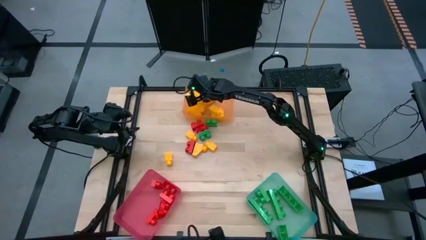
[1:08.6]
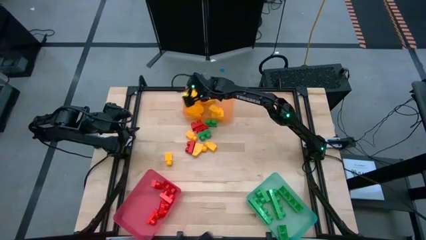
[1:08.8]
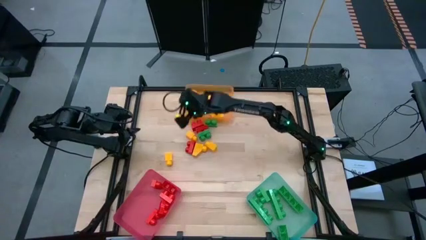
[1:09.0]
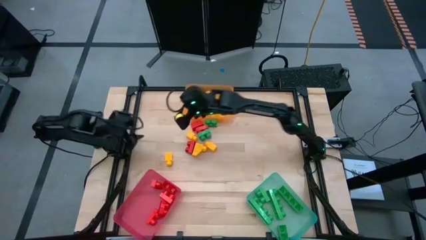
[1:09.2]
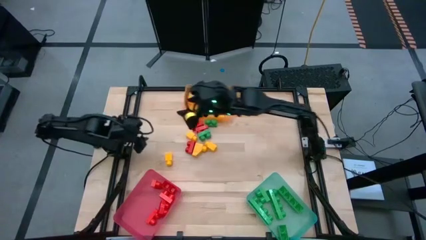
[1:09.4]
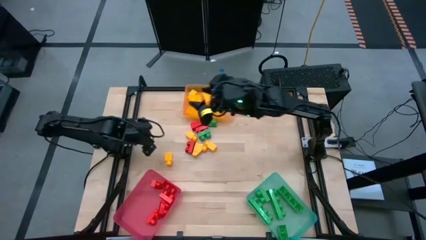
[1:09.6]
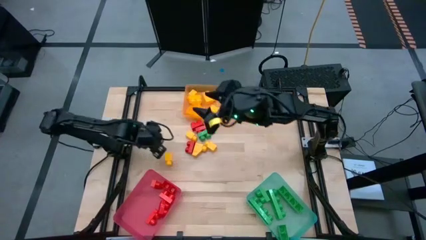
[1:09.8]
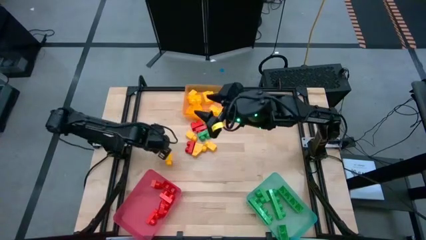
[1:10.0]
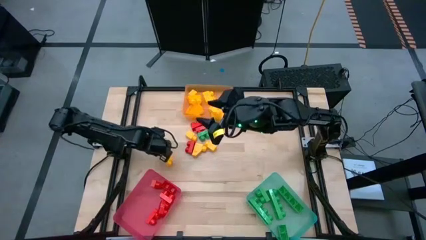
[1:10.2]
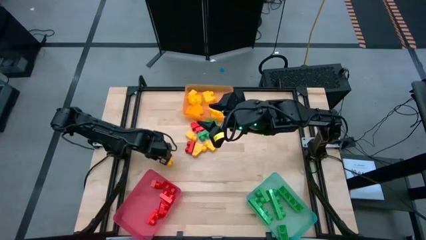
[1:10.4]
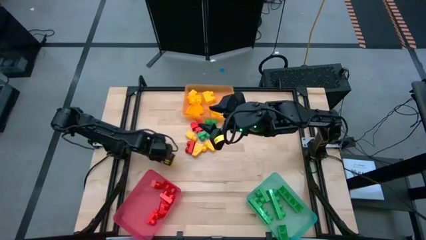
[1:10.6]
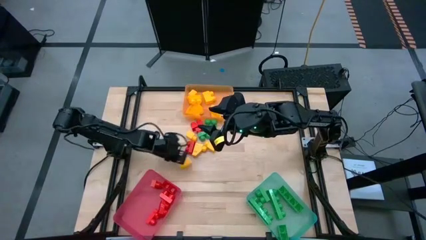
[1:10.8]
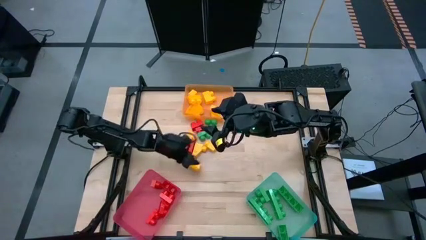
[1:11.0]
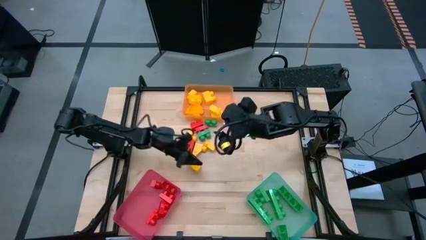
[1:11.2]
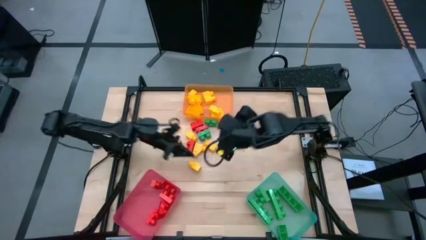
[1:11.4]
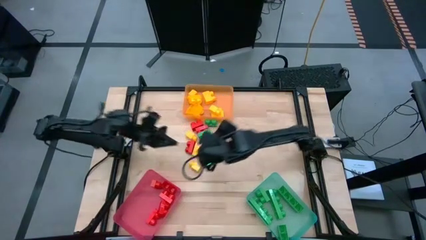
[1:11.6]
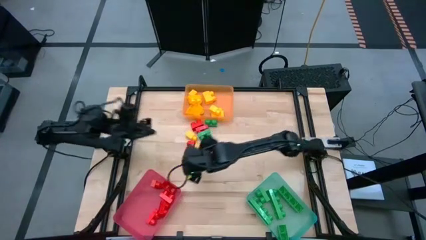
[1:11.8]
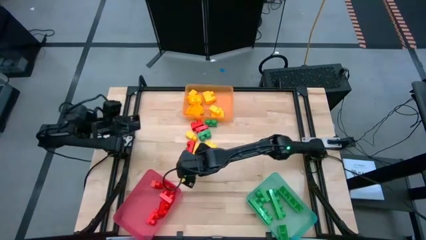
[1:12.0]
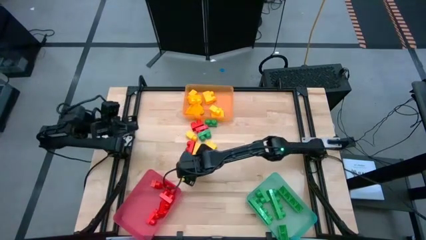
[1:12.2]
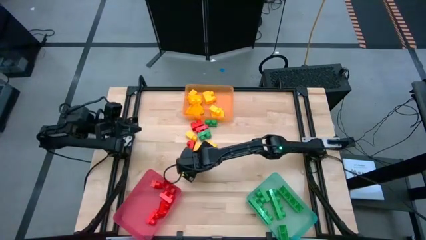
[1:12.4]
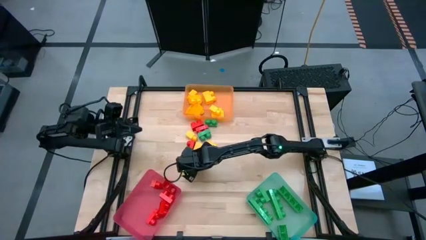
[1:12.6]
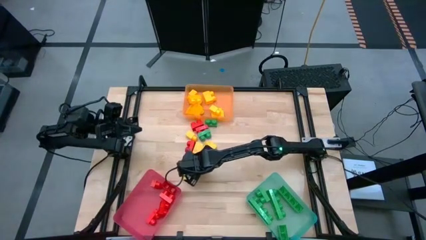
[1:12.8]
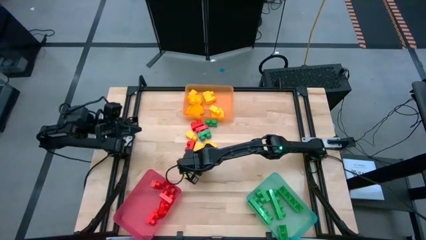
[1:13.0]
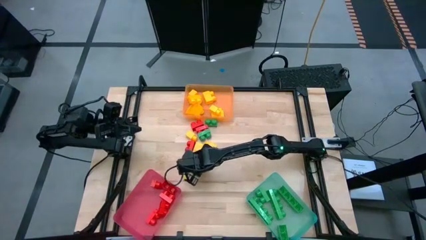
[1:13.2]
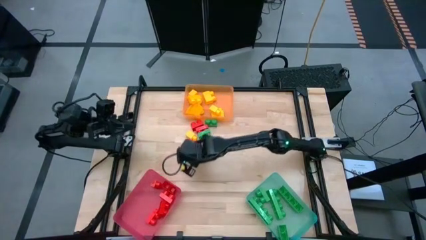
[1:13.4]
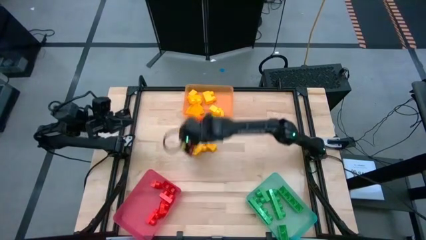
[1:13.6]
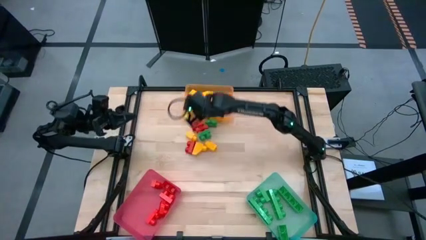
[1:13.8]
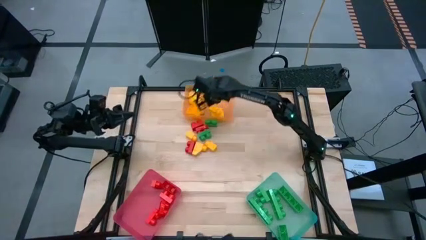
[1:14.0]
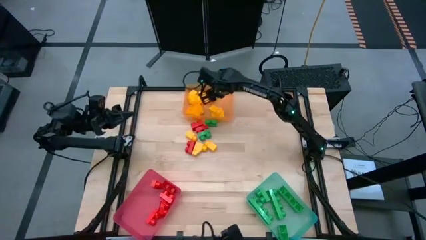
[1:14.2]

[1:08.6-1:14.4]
Task: Sort blocks
Put the yellow 1 stud game piece into the orange bin

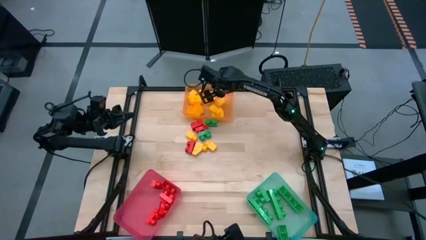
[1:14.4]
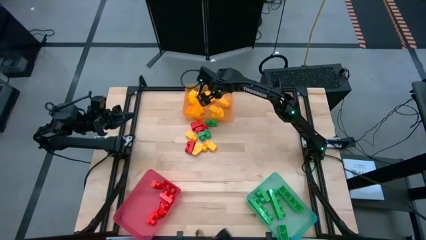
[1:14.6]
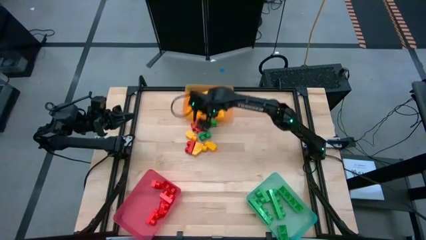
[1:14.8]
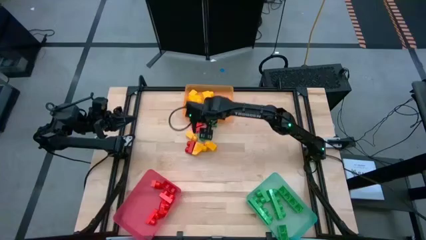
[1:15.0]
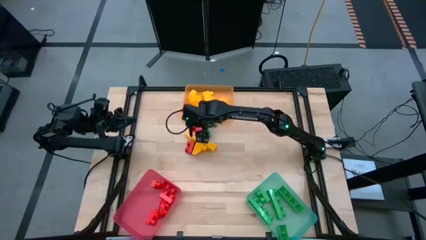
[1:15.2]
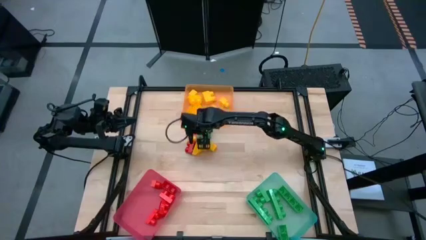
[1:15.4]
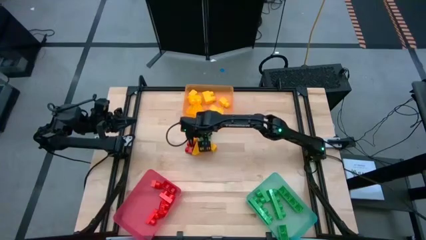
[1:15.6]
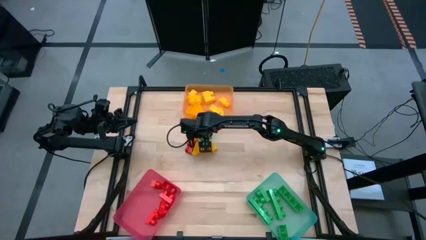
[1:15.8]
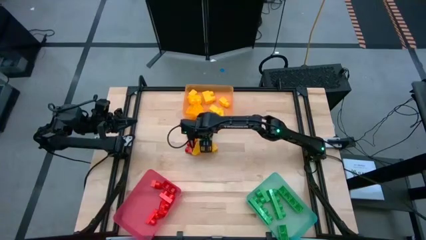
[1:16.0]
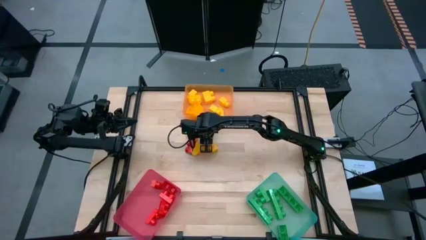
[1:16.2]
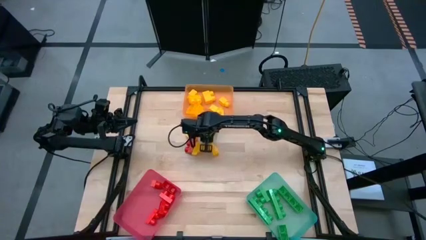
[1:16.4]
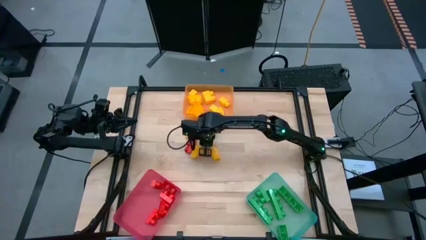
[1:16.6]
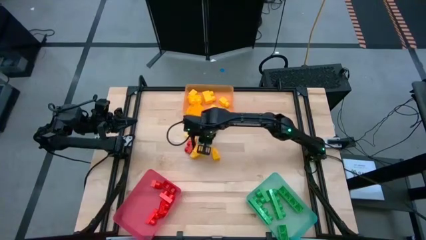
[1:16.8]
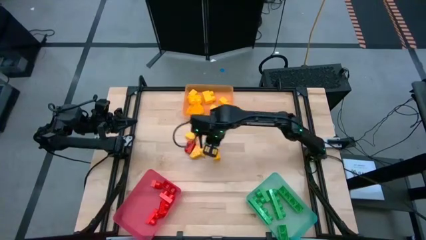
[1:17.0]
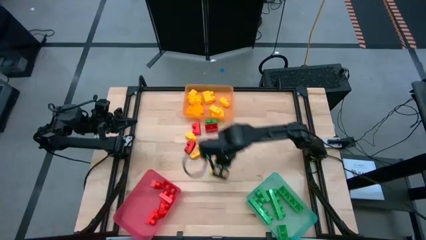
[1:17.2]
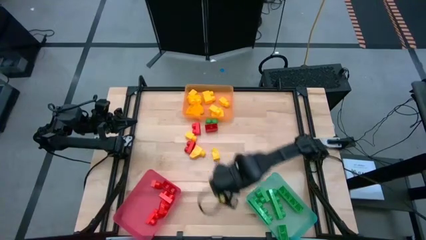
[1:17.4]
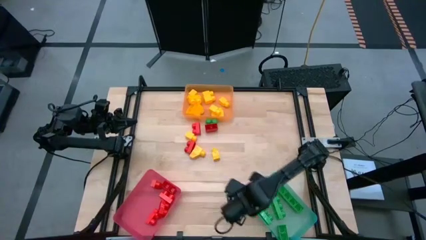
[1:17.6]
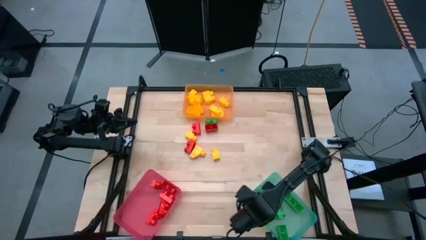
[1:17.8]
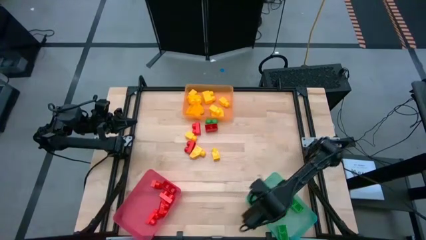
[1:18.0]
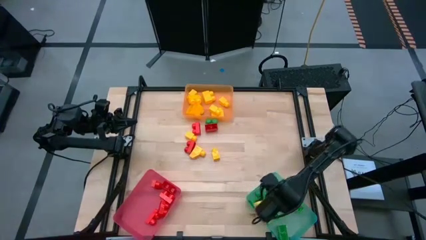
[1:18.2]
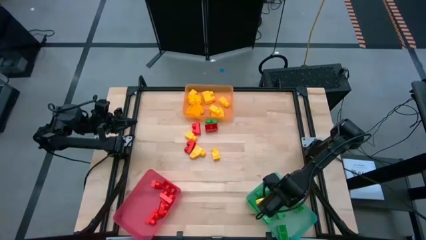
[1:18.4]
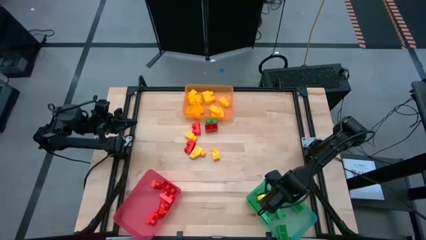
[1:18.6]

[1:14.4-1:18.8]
Put the green 2 stud game piece into the light green bin

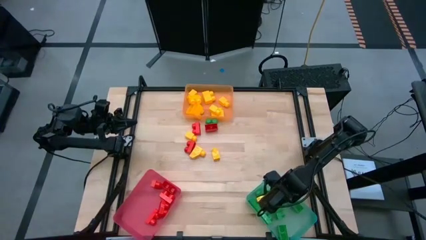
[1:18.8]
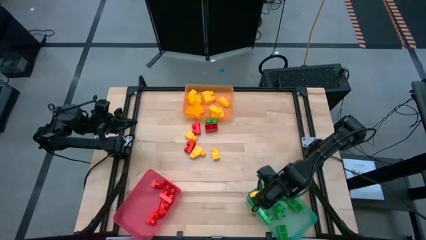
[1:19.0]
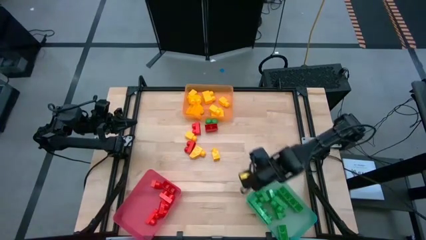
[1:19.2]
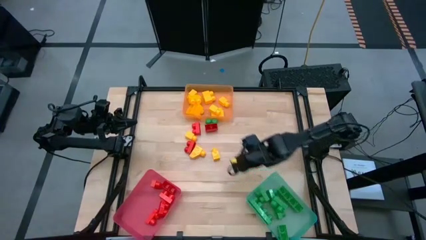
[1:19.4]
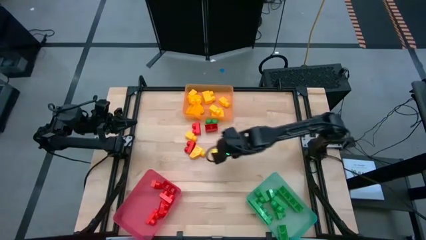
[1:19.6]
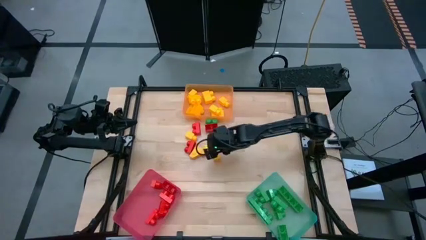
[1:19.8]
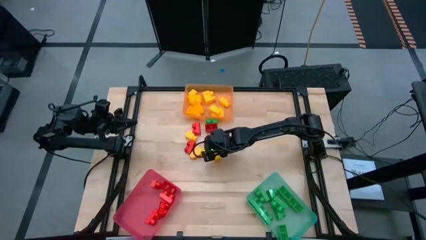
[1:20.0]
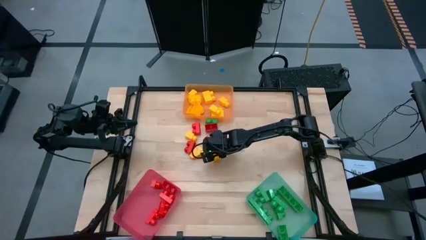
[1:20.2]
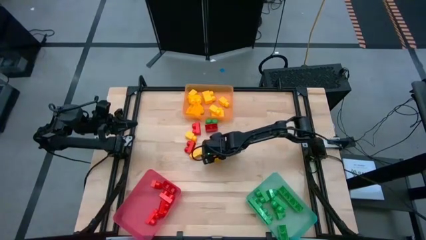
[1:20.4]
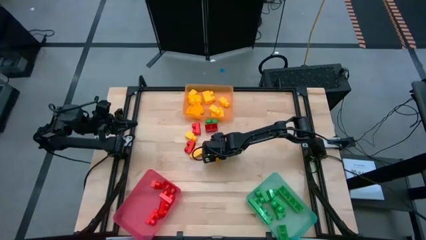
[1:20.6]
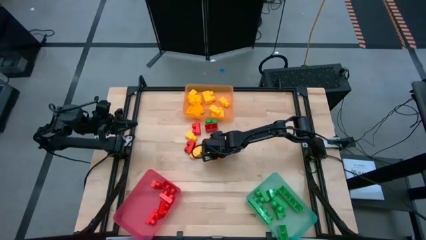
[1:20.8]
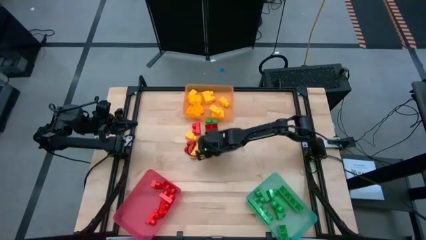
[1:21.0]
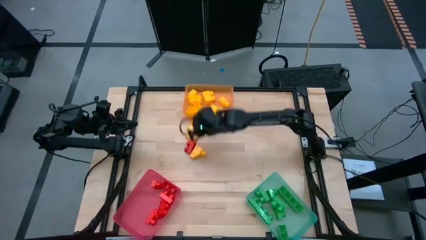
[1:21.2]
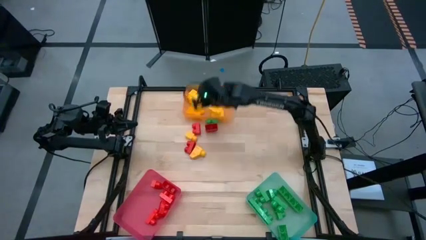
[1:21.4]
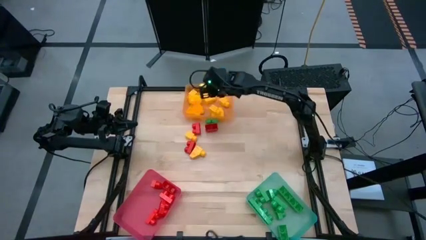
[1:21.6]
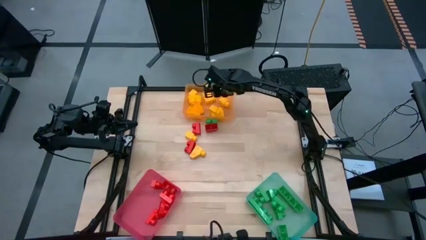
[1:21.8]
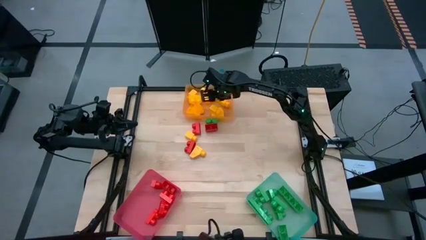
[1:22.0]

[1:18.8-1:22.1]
Put the yellow 1 stud game piece into the orange bin

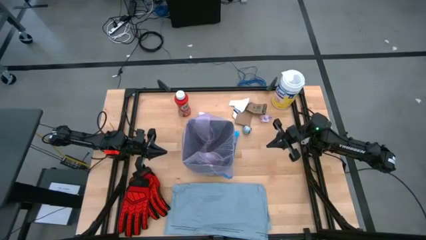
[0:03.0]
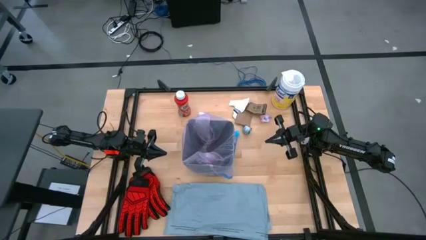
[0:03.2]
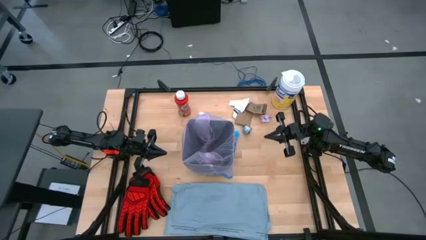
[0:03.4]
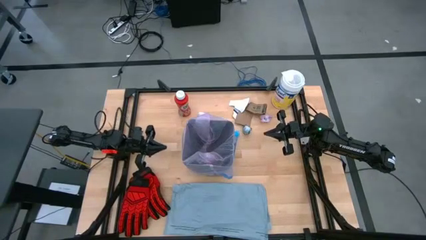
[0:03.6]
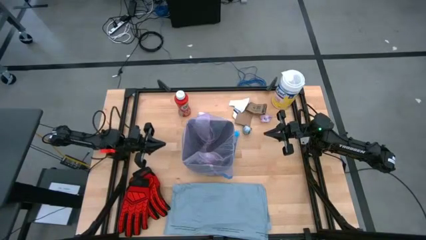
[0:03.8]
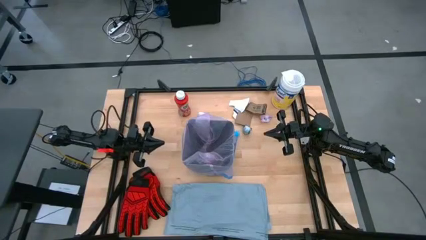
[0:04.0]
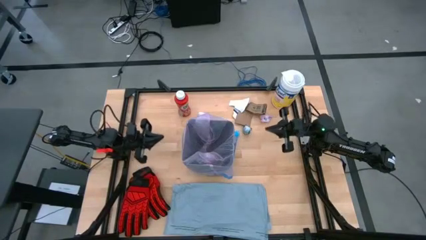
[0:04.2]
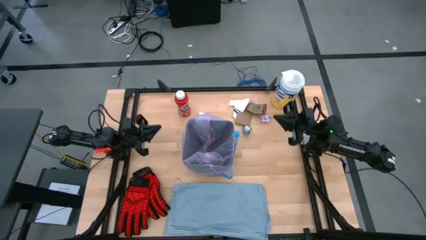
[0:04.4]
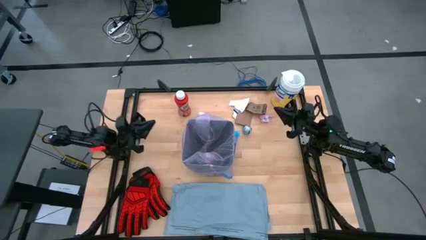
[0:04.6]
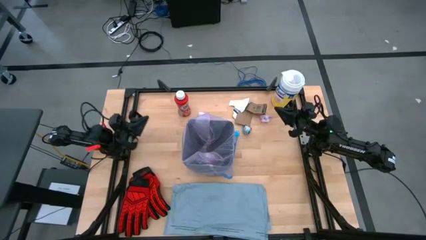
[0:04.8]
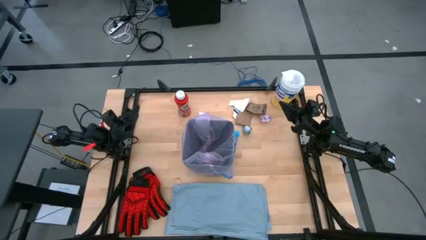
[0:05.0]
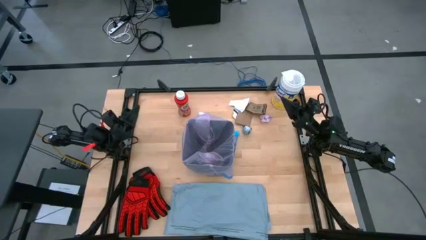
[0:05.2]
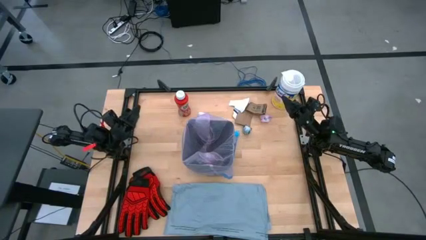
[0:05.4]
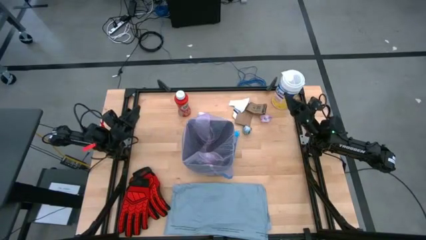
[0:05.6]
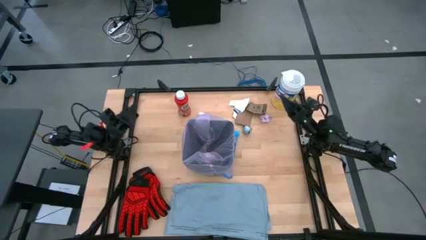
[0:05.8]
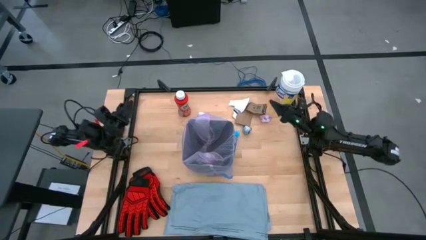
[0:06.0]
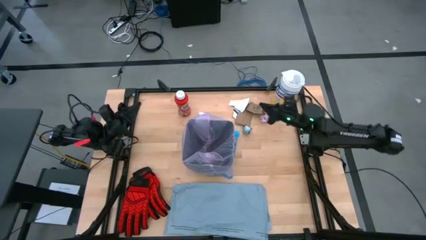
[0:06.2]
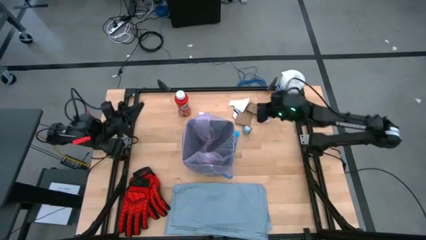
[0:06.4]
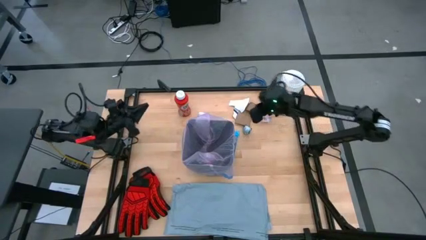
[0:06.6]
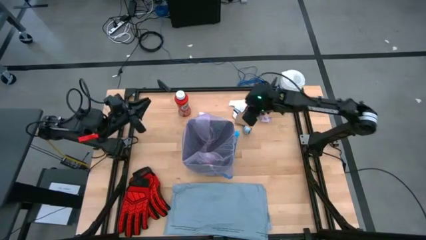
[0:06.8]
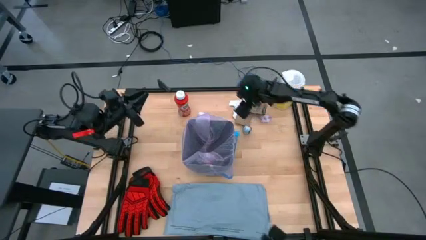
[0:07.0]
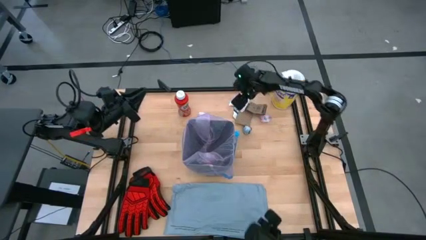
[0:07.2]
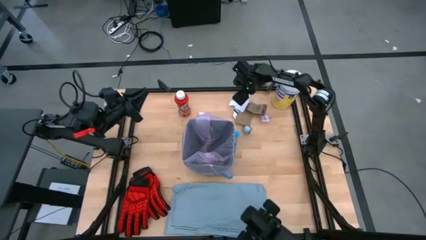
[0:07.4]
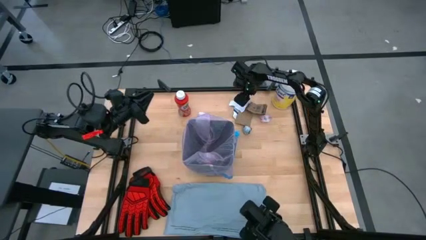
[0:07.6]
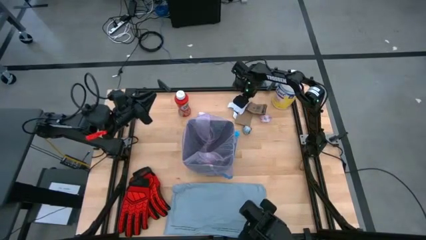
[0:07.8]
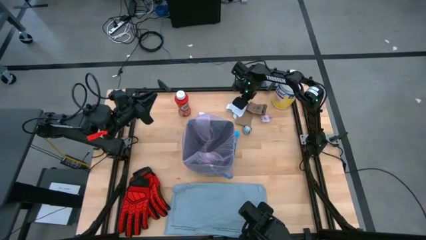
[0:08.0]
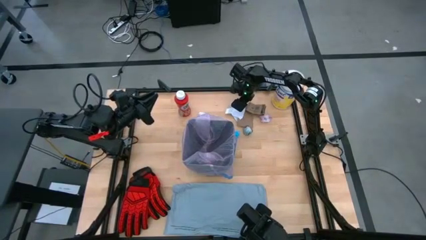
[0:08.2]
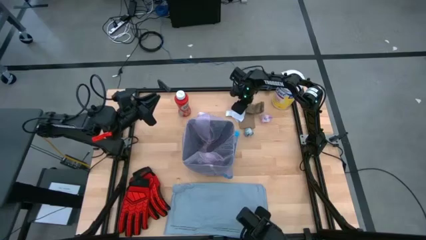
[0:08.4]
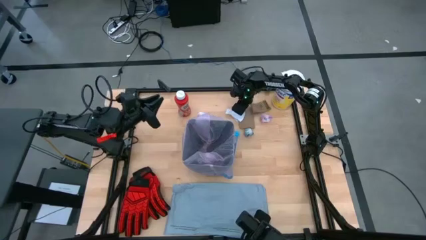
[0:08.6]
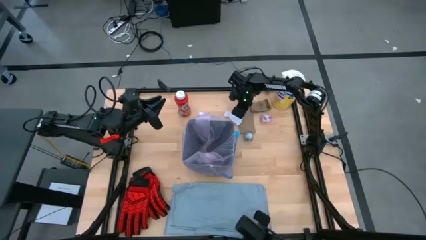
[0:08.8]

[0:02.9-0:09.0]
Task: place trash/remove bag and relplace
Put the white paper material into the trash bin
